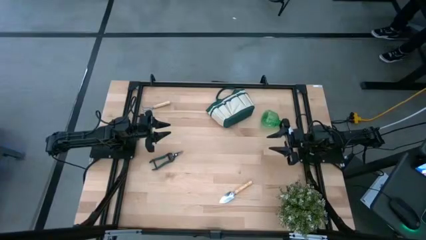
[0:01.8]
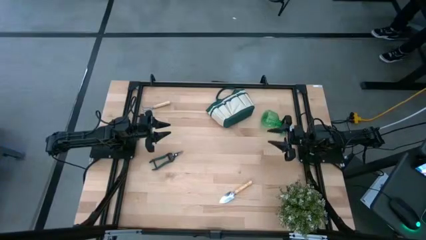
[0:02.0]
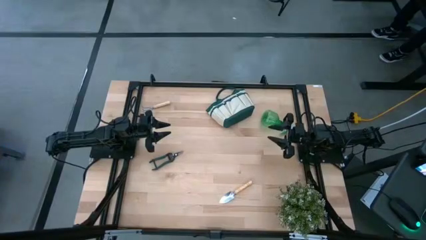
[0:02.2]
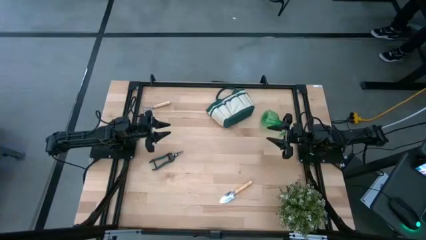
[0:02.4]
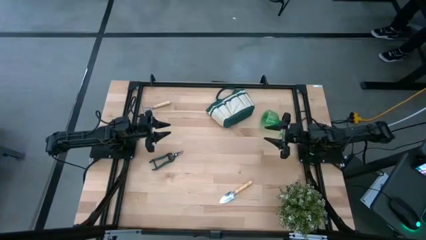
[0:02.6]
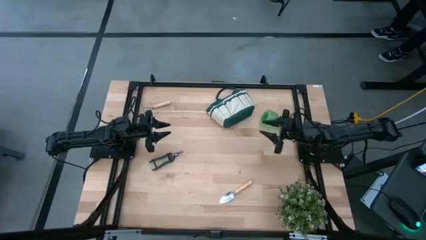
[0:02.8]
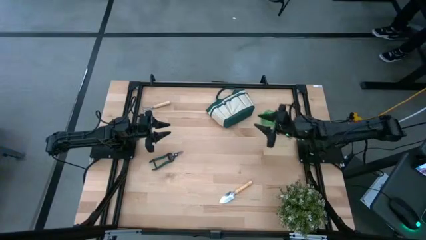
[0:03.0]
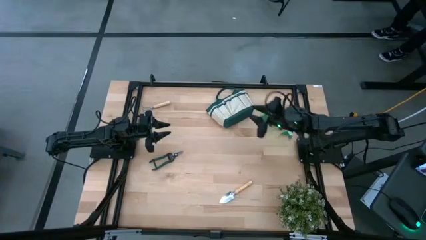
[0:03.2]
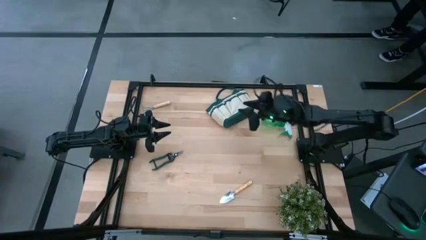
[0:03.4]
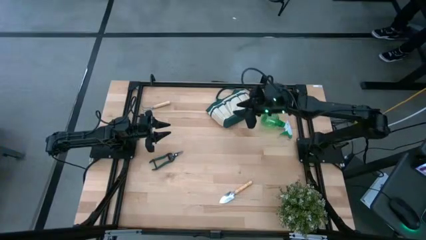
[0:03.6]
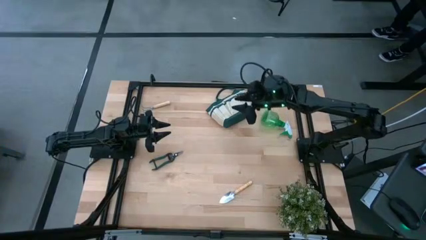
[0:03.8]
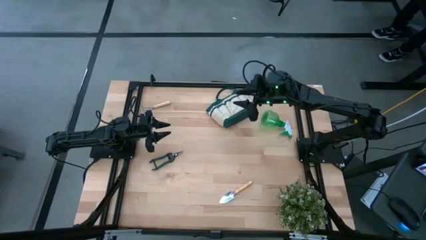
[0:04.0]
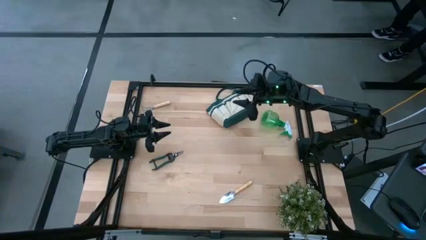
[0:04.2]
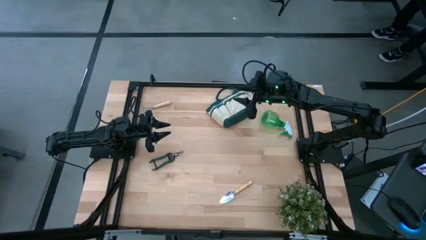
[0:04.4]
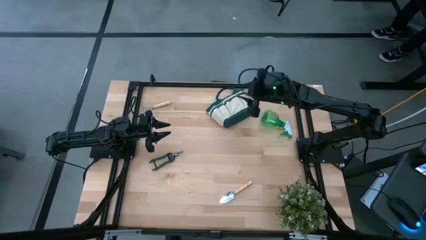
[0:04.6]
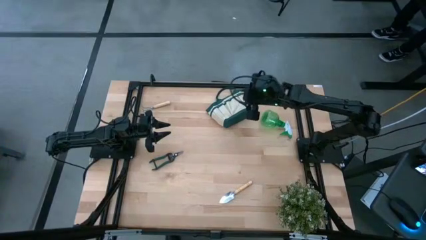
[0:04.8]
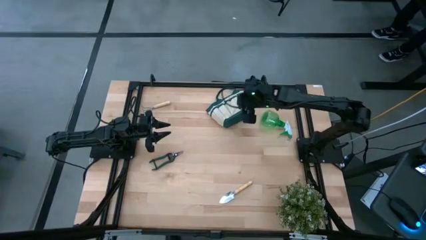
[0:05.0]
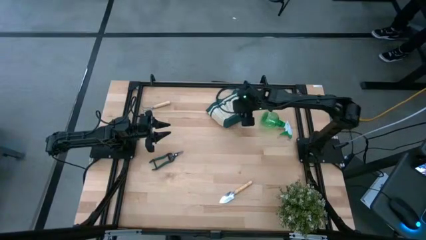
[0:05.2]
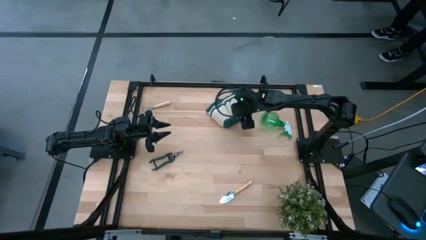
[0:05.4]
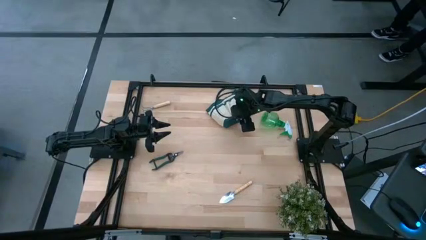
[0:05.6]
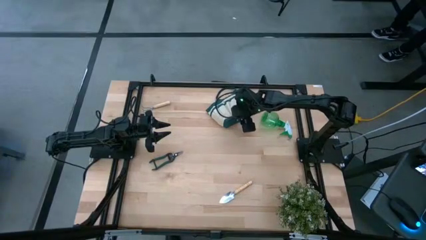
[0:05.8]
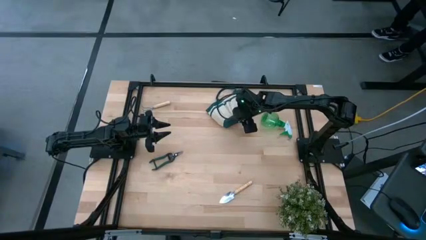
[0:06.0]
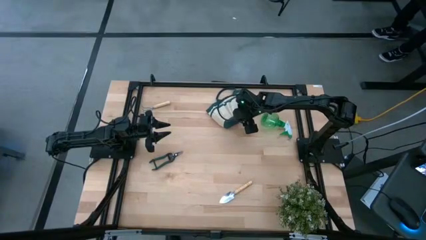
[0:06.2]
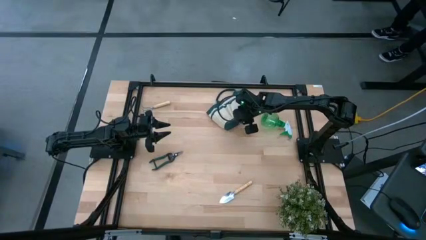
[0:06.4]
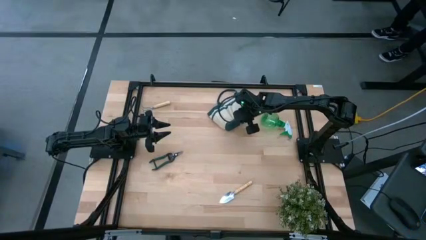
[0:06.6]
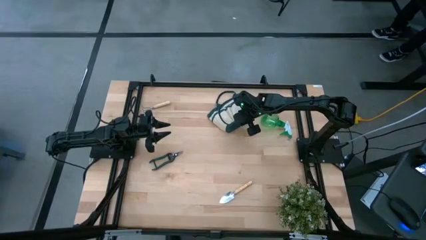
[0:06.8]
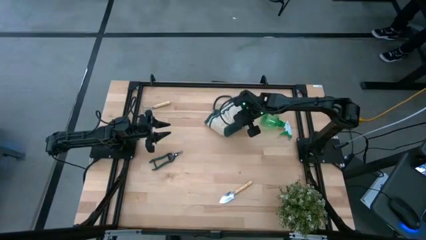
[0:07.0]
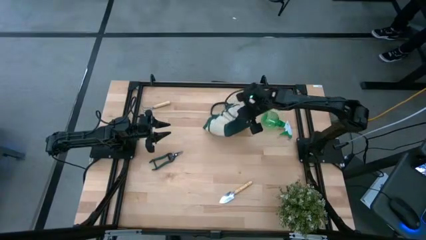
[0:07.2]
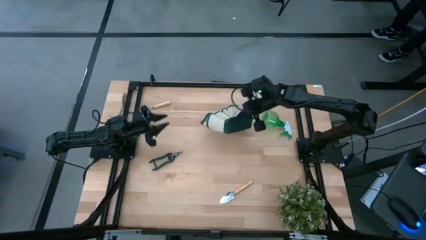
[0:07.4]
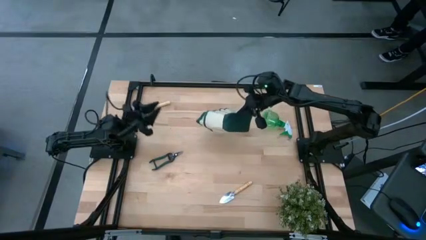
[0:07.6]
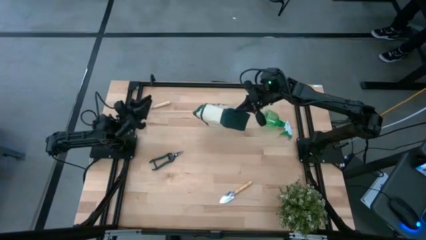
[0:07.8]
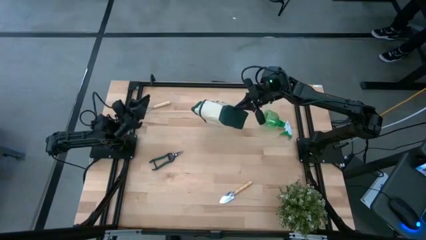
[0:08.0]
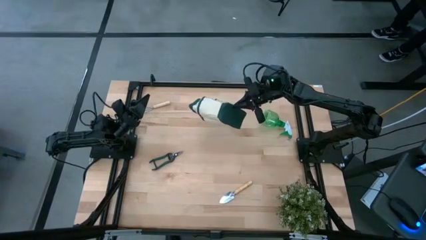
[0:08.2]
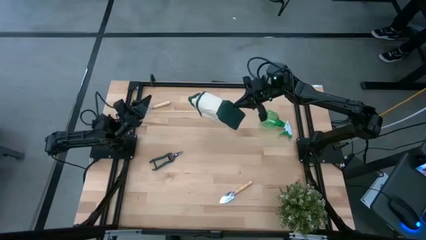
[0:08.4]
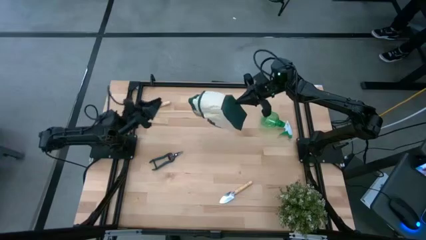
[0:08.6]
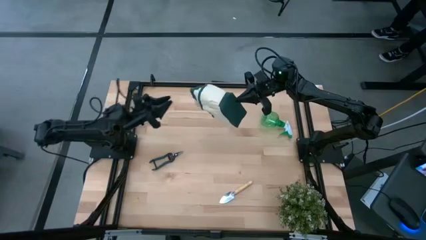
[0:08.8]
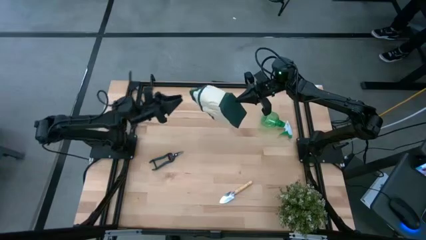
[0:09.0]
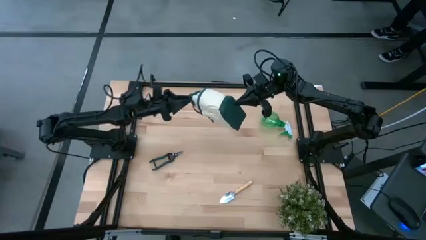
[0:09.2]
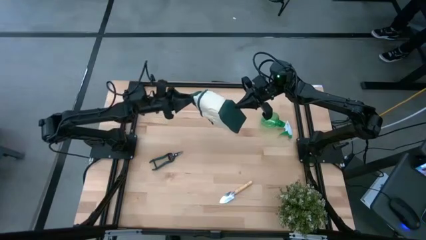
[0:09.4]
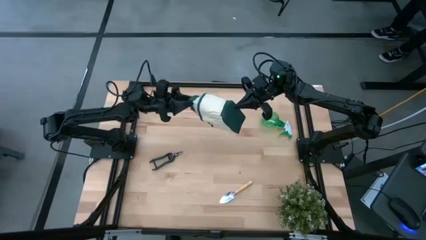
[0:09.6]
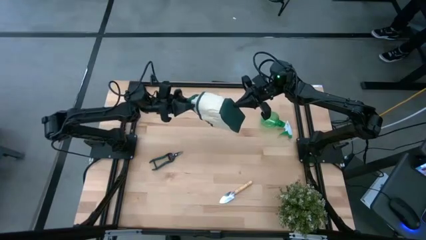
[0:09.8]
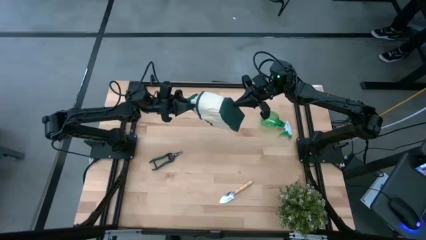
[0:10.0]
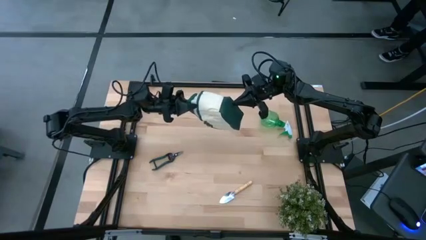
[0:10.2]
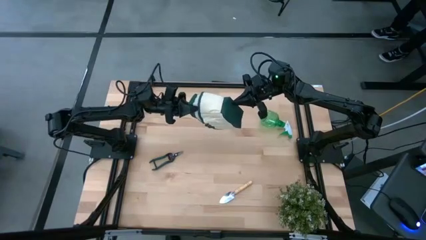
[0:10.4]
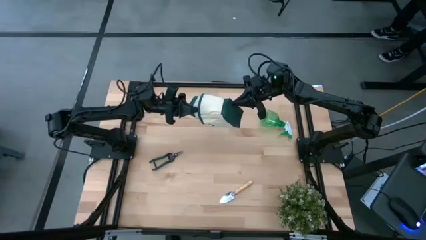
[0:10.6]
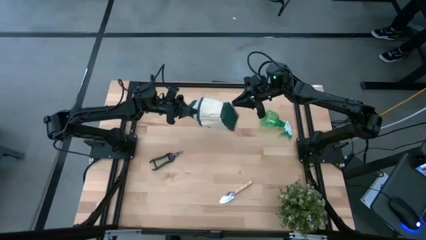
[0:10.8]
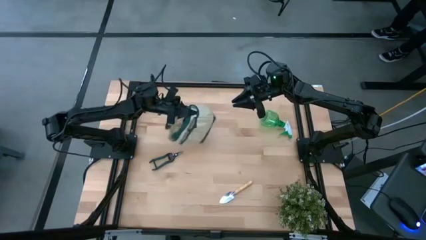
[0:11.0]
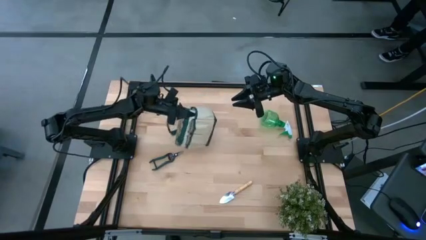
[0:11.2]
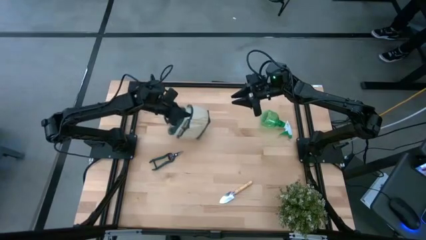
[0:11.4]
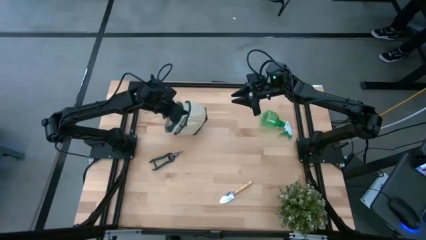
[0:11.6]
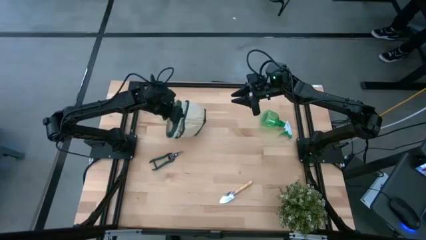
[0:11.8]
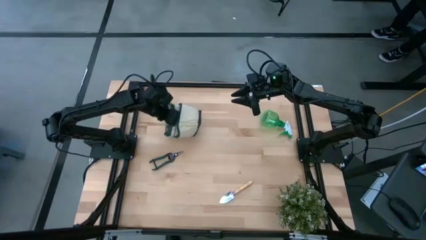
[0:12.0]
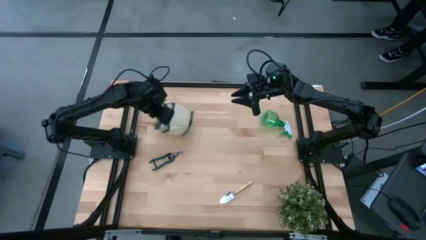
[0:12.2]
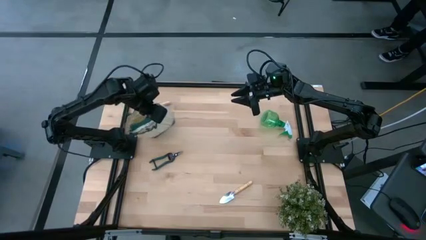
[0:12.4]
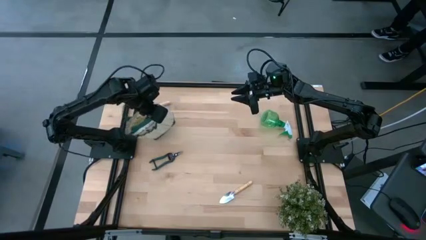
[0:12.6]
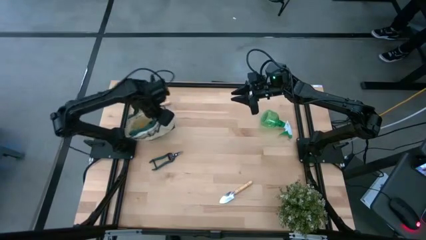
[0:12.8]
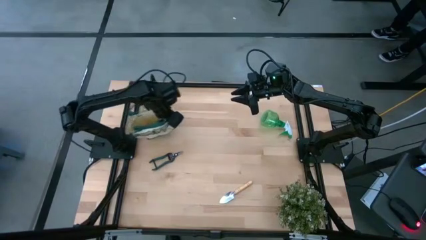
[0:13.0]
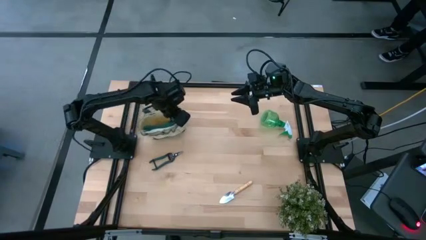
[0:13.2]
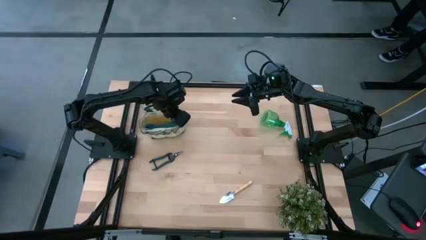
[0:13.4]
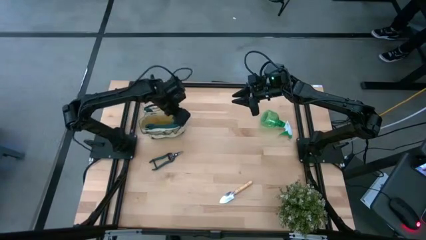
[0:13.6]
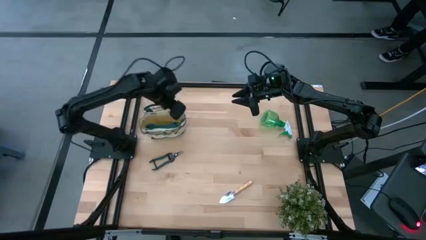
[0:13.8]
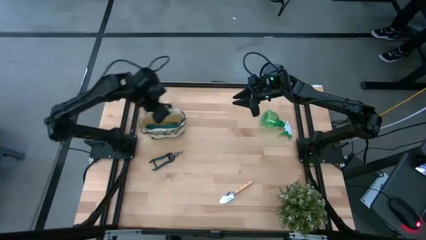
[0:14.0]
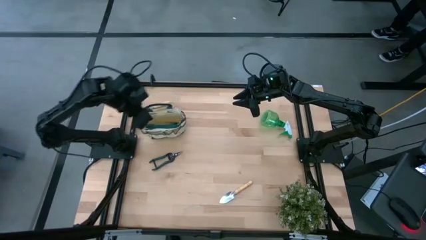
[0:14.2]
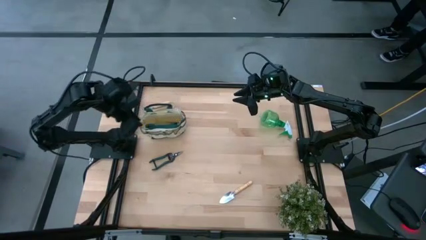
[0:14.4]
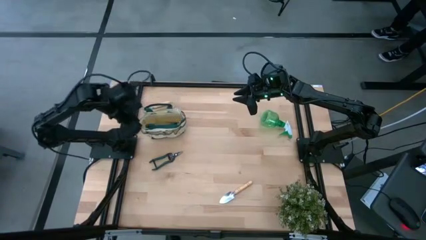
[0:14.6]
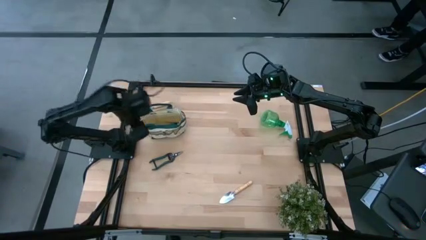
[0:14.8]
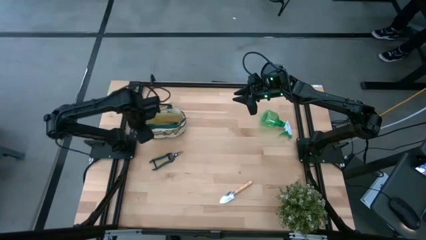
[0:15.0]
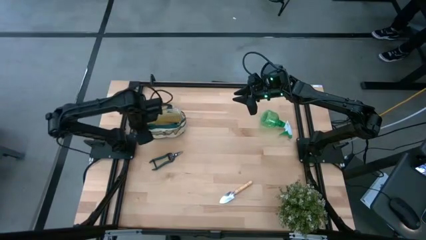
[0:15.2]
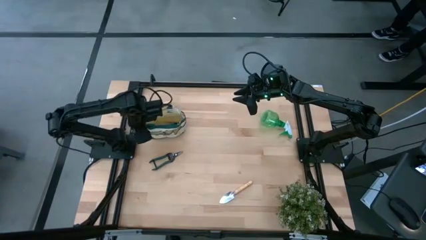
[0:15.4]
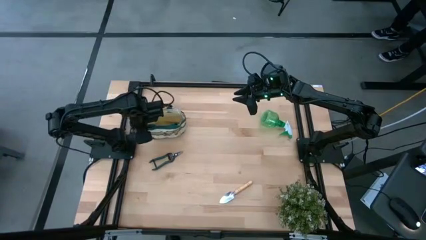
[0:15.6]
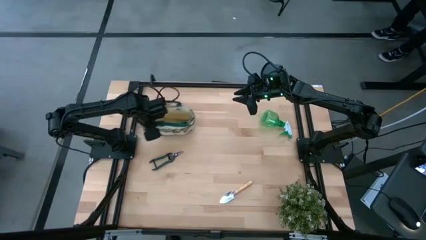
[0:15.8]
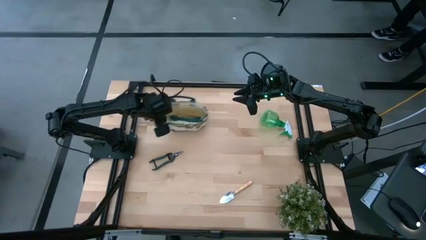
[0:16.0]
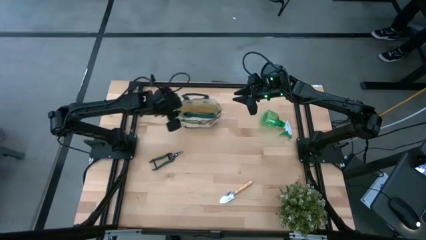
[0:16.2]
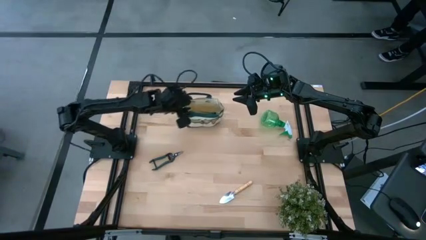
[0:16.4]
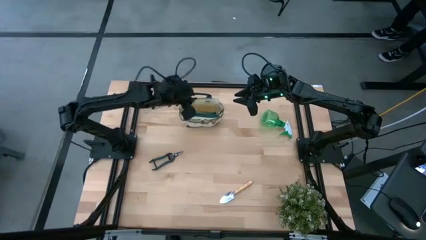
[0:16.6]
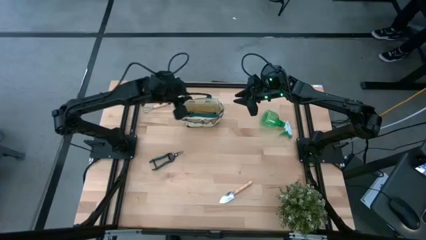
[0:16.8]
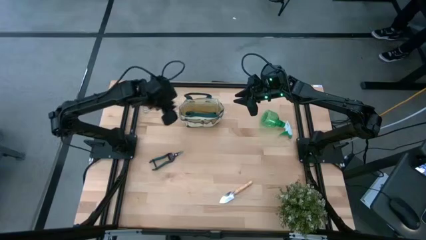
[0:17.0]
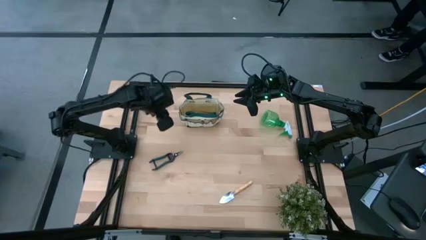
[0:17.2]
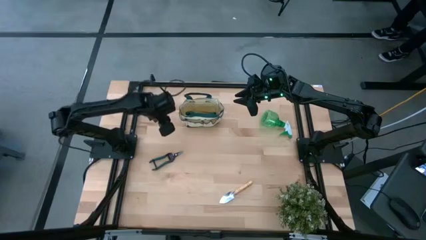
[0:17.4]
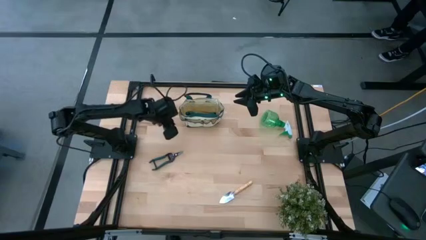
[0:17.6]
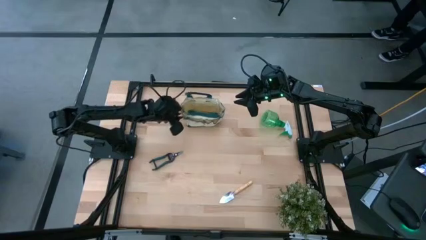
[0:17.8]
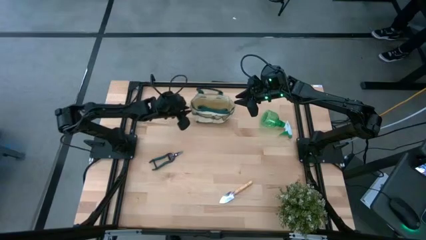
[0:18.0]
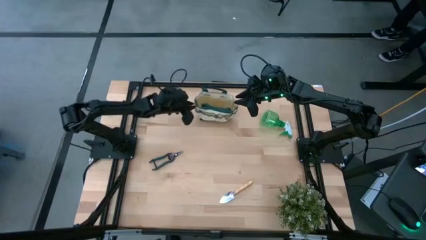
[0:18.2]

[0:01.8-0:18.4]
Task: Pick & Place Garden tools in Gardening bag
Prepare the gardening bag
